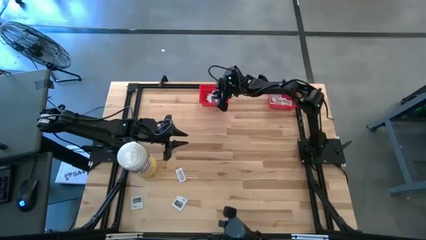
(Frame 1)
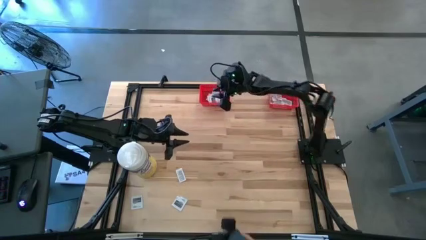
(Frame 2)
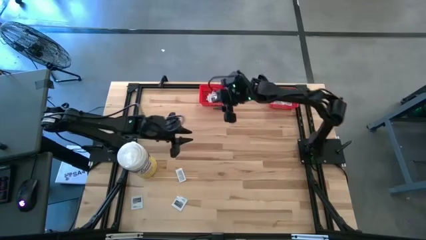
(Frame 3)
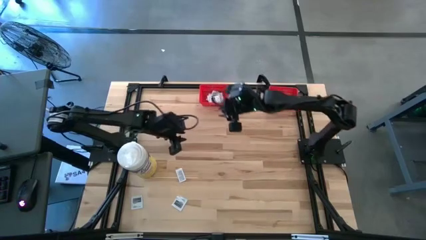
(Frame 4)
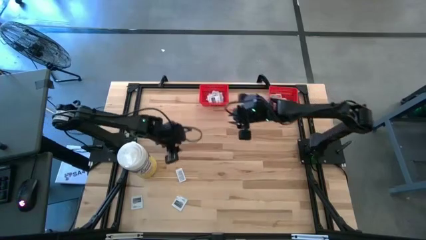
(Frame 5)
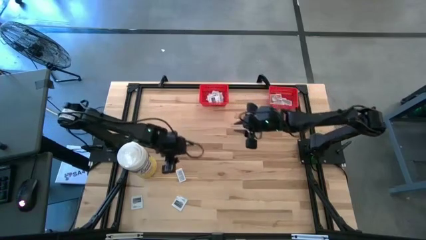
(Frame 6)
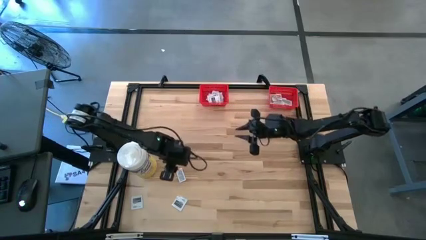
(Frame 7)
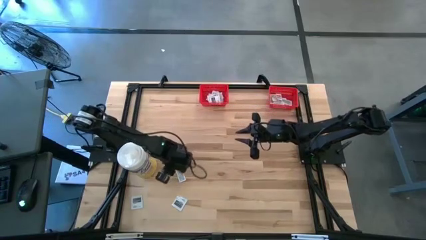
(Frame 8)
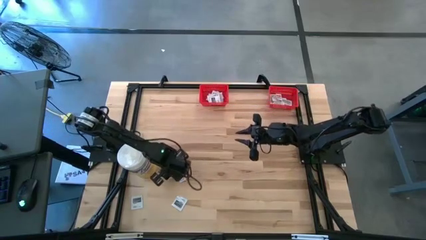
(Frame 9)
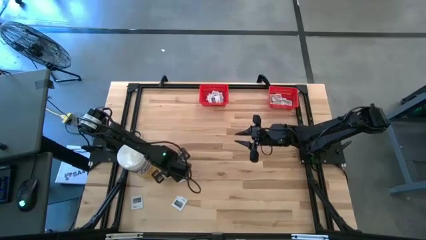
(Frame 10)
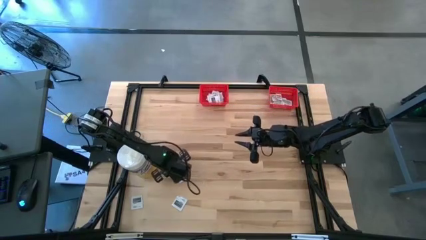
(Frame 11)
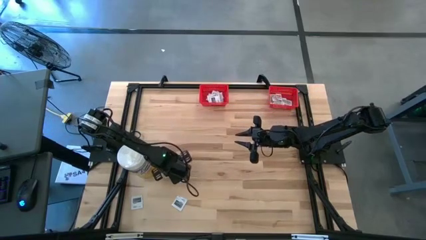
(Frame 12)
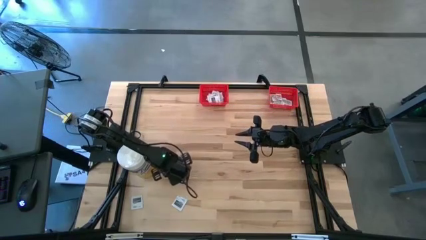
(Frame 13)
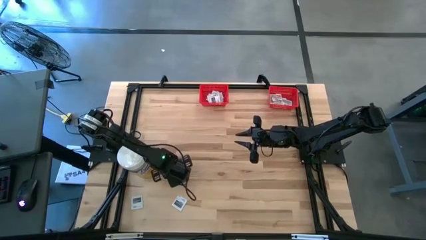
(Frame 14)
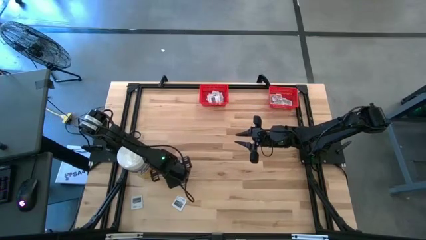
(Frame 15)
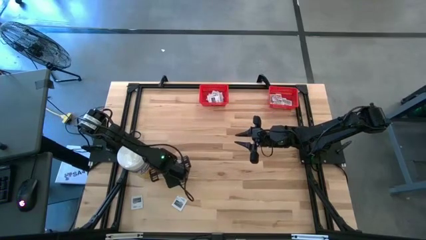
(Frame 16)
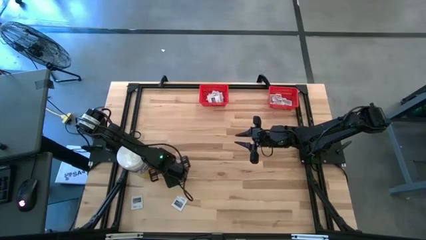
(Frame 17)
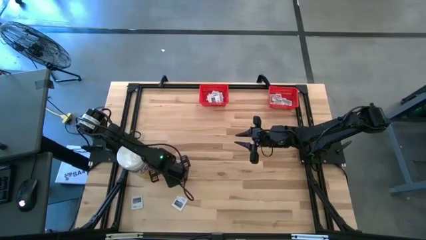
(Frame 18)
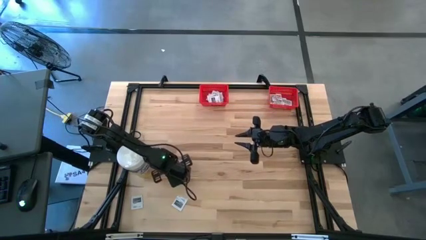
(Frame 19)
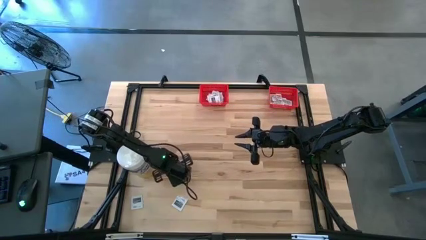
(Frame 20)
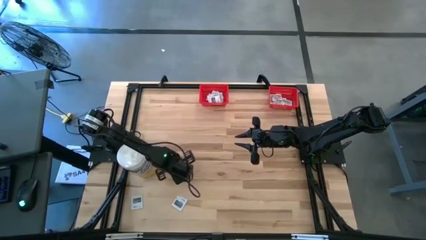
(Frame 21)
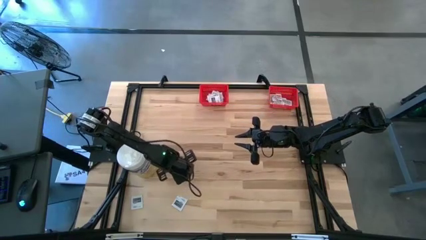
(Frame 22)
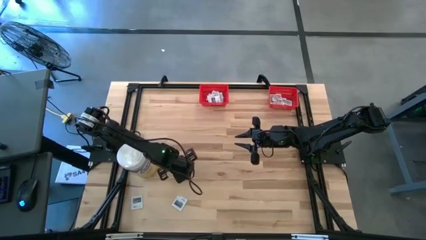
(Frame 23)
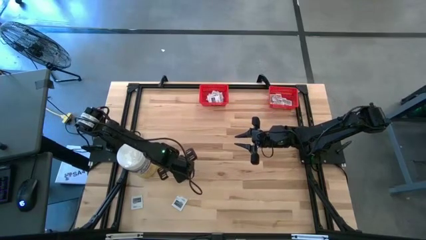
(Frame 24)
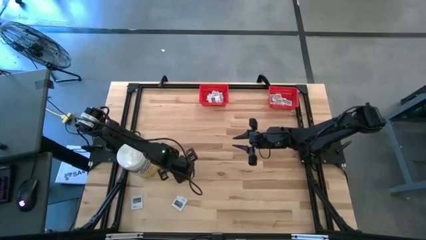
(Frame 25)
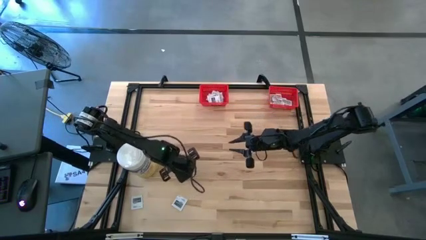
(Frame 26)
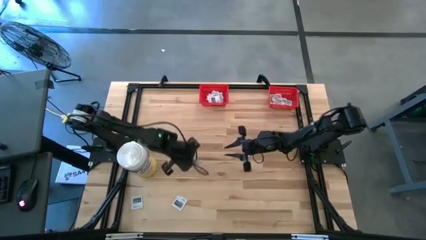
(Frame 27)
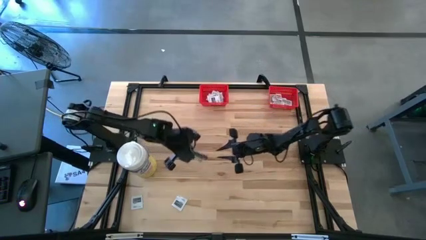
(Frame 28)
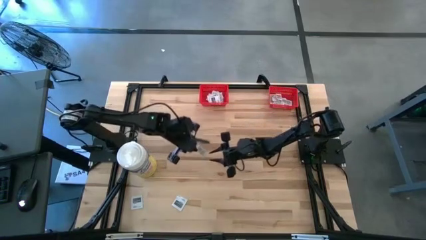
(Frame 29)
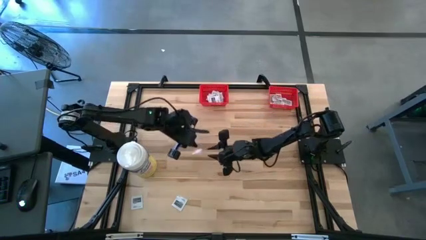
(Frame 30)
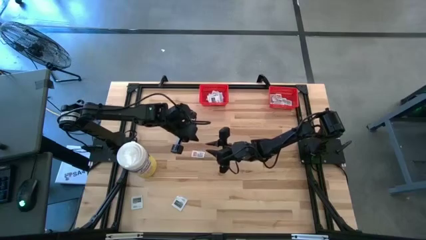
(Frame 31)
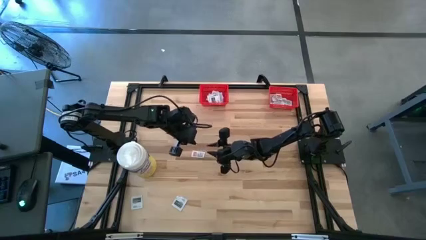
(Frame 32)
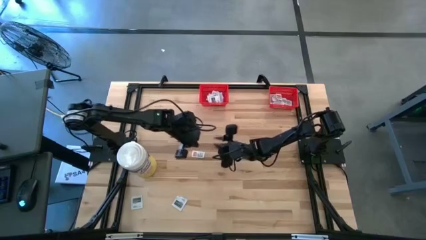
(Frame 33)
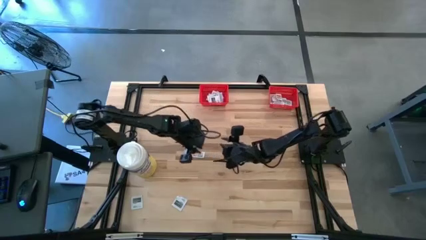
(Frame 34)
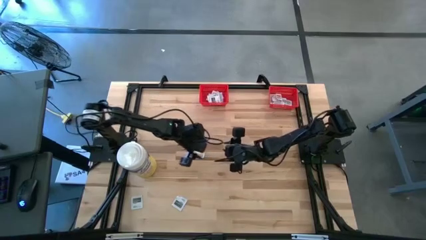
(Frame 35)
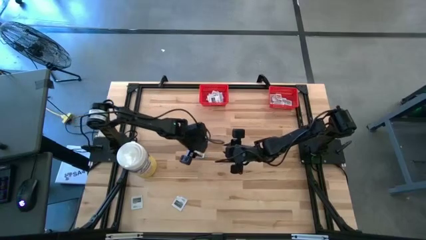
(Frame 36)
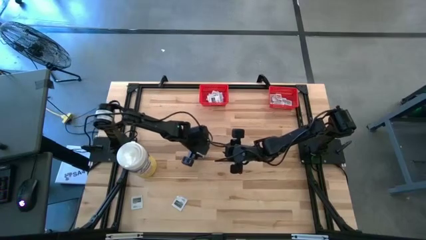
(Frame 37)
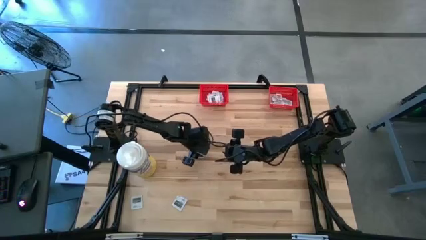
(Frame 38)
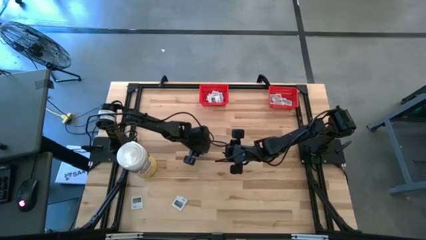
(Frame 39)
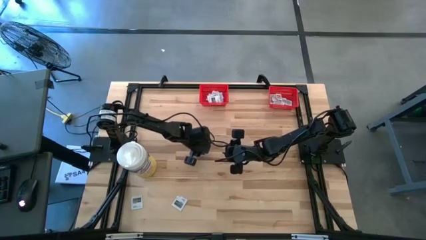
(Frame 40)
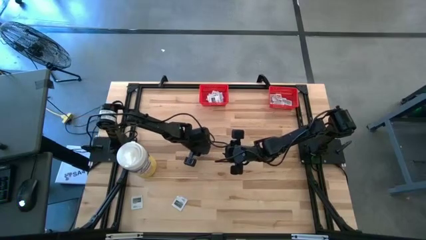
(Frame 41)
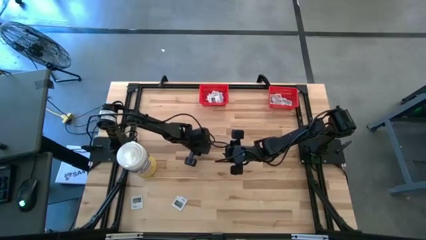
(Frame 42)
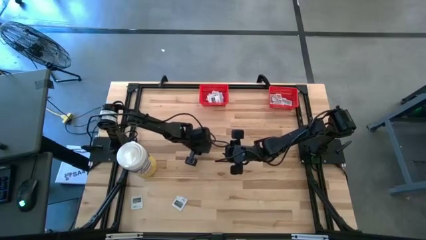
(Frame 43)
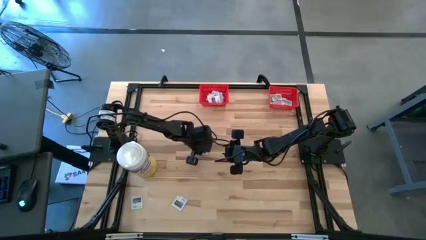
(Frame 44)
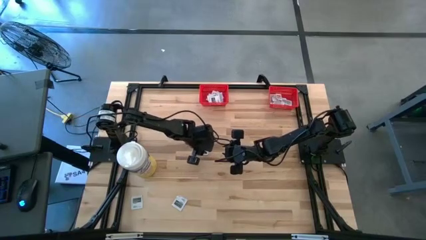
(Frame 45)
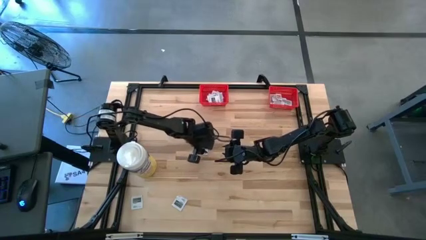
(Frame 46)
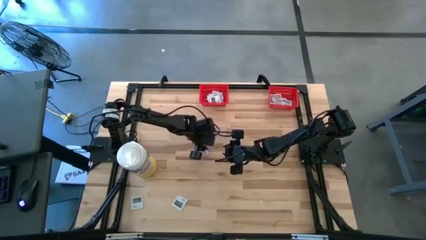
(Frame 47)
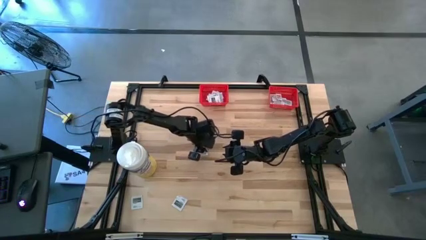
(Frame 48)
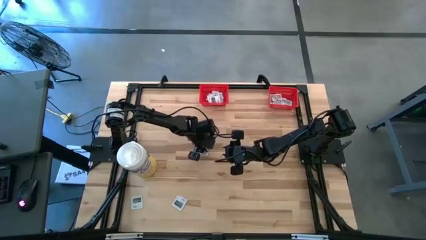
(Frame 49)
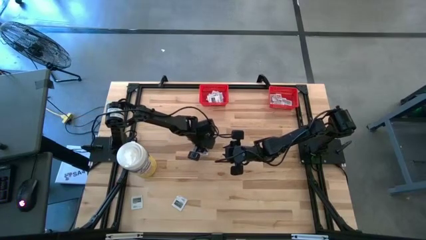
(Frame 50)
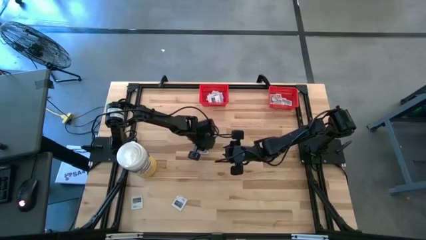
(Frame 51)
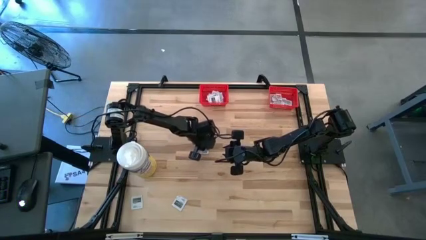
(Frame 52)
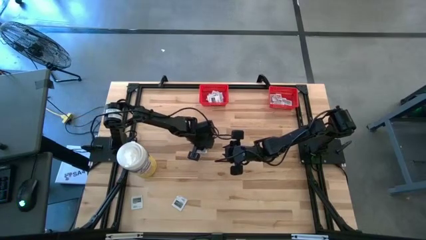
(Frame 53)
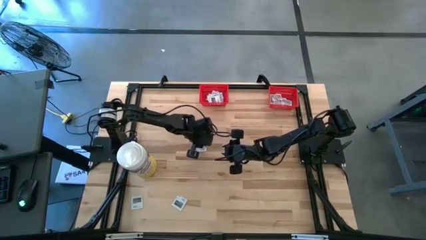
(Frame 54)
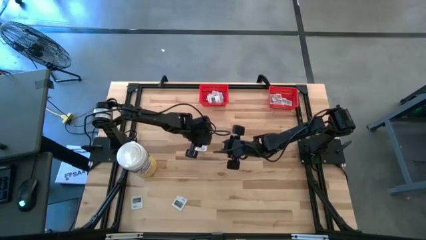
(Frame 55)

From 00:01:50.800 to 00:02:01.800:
Task: Pick & Place First Aid Supplies
Put the ointment pack into the right red bin

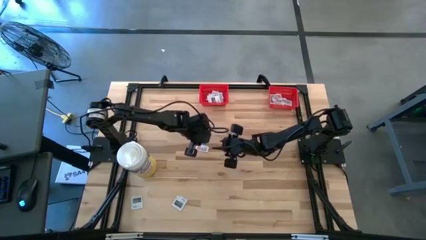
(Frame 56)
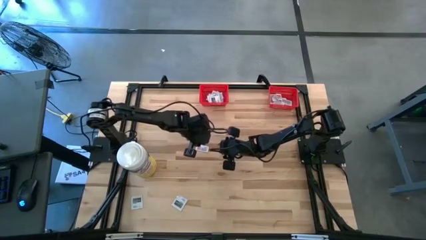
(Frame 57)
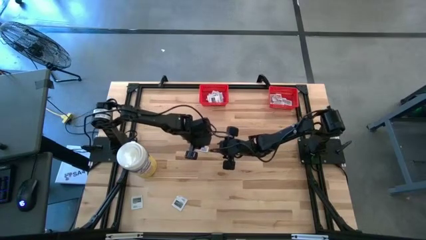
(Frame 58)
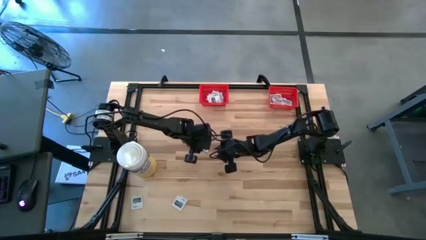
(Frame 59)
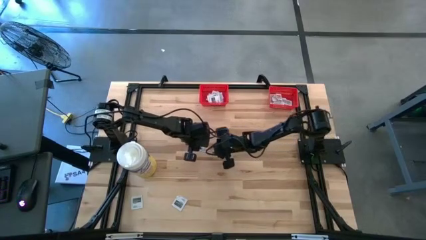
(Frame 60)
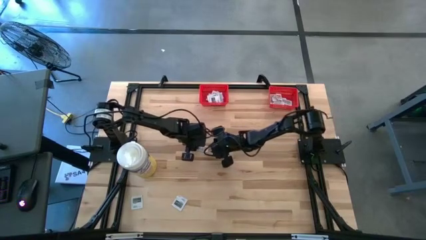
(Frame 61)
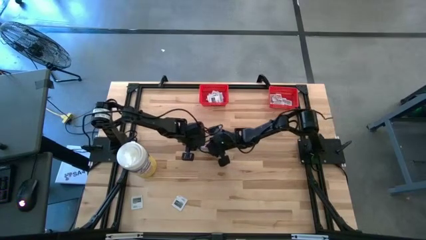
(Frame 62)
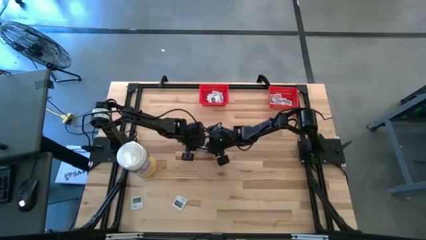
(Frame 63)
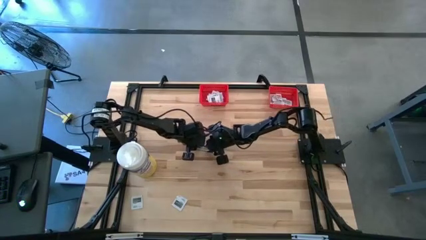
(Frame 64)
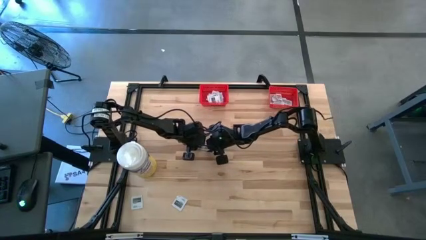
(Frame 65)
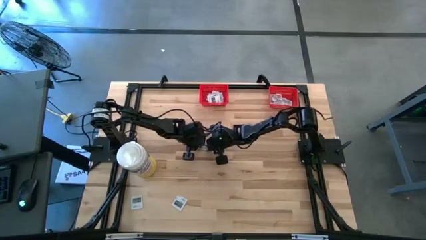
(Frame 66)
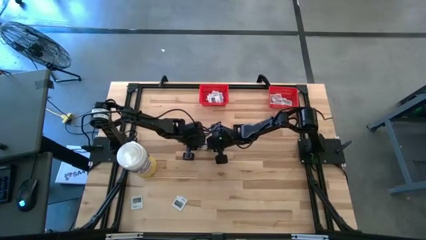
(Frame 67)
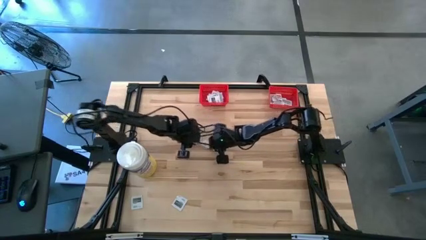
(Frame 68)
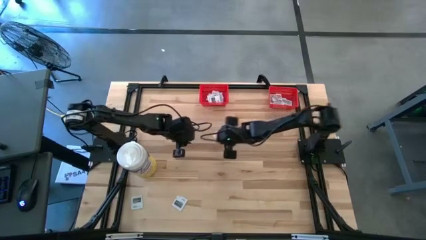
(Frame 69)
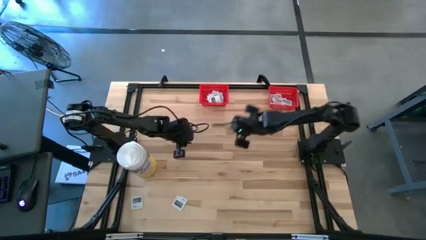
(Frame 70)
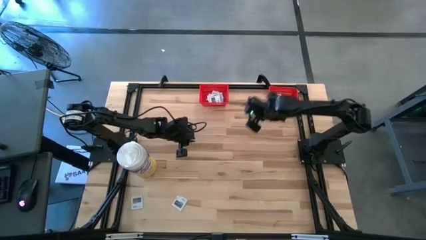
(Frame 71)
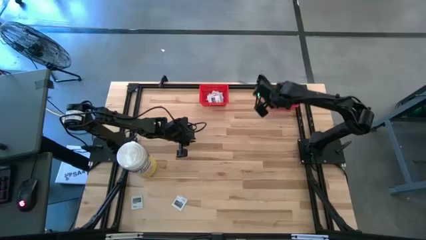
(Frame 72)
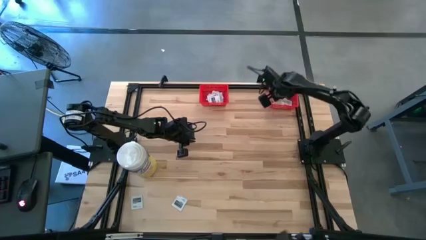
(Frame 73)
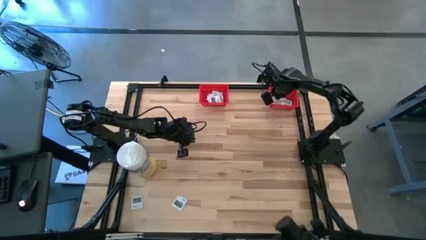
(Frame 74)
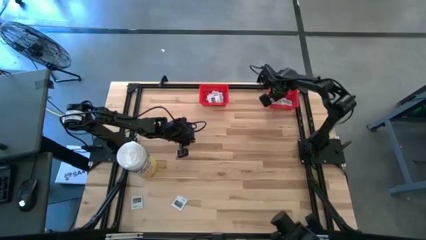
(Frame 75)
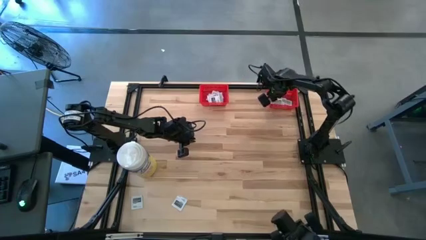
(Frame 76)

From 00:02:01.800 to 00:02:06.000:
Put the ointment pack into the right red bin

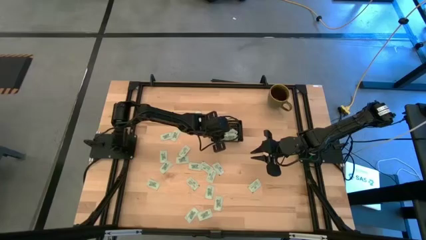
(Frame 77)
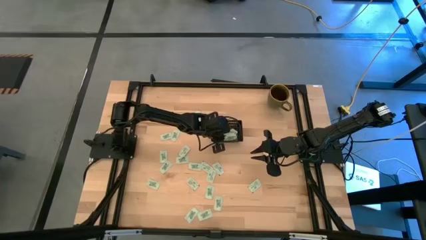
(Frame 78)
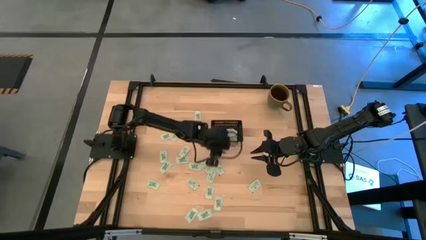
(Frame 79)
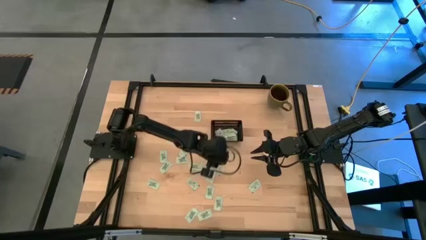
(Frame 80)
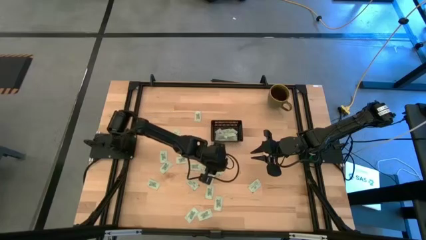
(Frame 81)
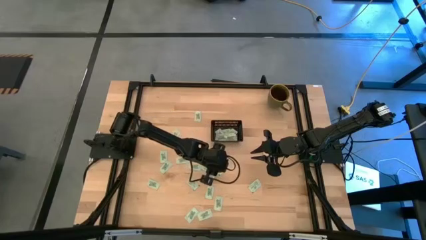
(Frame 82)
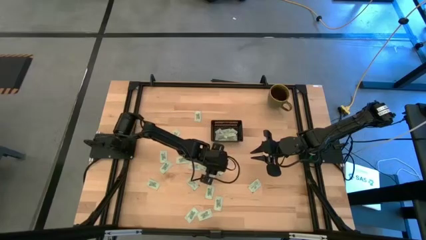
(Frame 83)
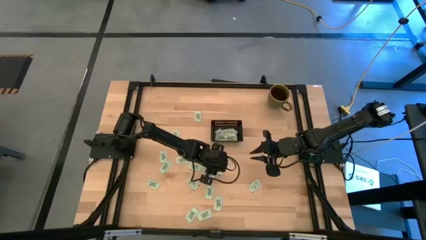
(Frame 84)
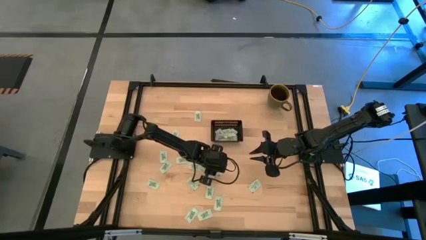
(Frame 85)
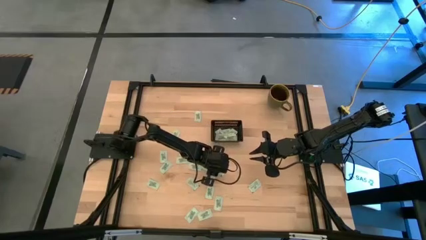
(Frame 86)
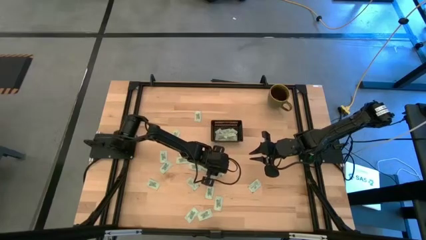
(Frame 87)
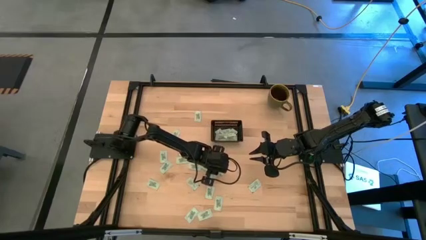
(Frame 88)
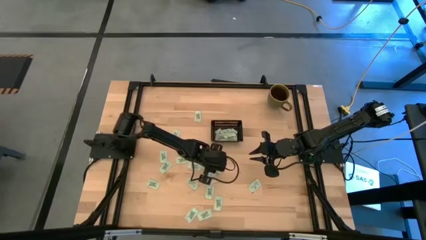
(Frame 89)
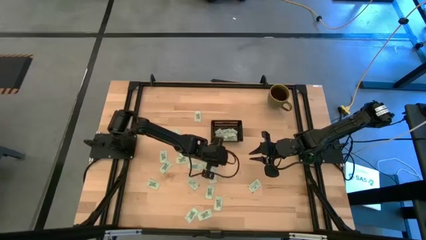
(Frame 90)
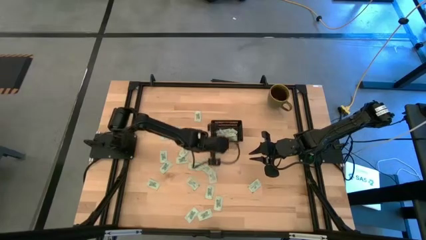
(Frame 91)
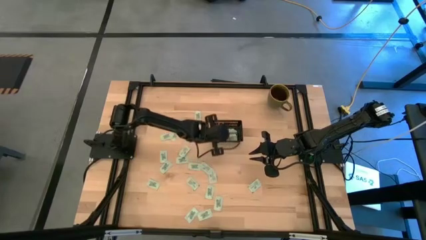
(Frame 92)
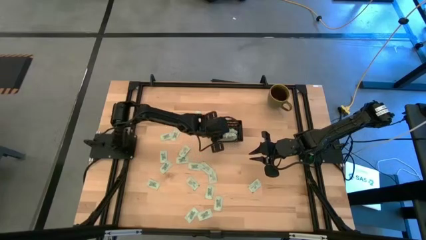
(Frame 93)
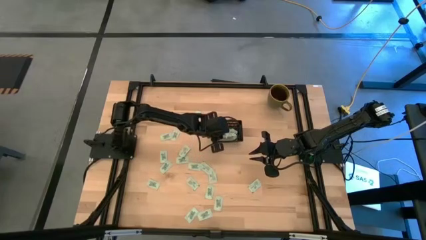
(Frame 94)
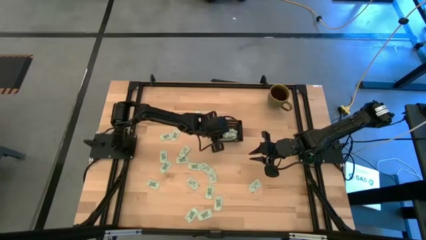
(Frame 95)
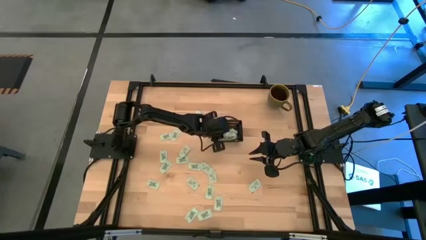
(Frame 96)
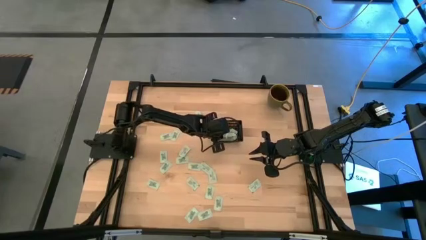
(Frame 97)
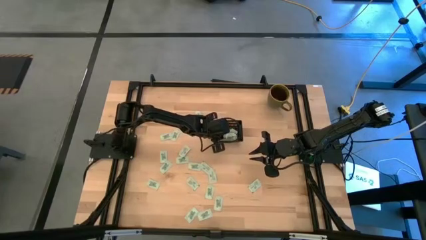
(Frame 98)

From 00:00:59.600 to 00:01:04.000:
Task: Pick and place Stevia / Truvia into bins
Put the stevia packet into the black basket
